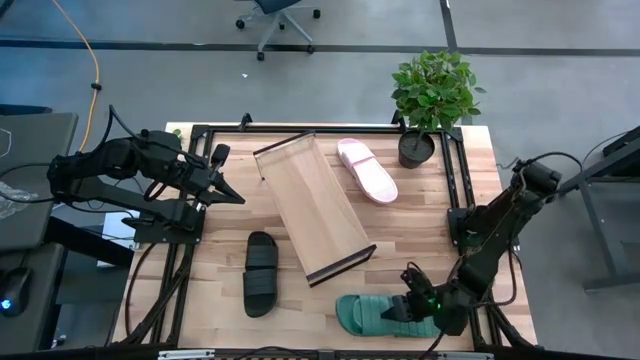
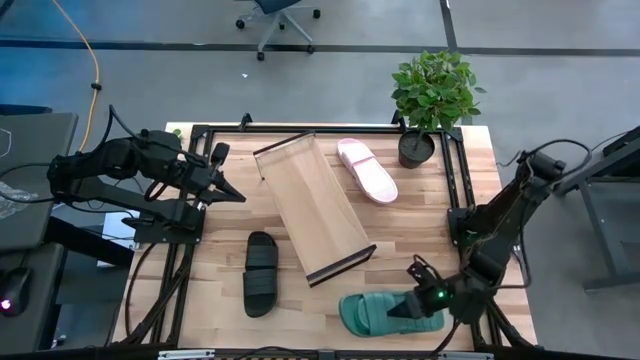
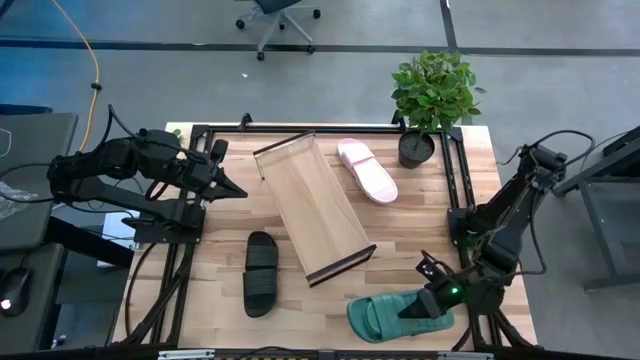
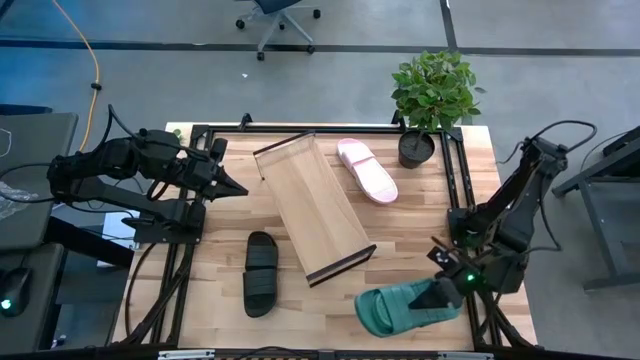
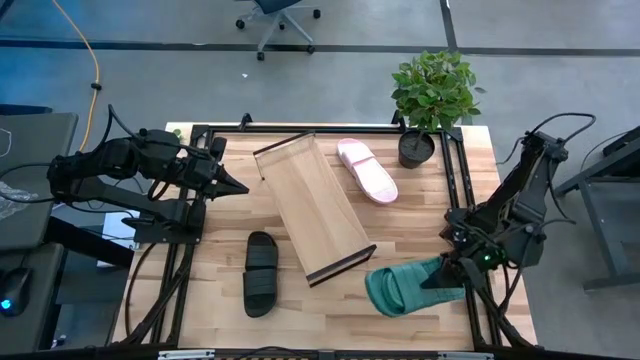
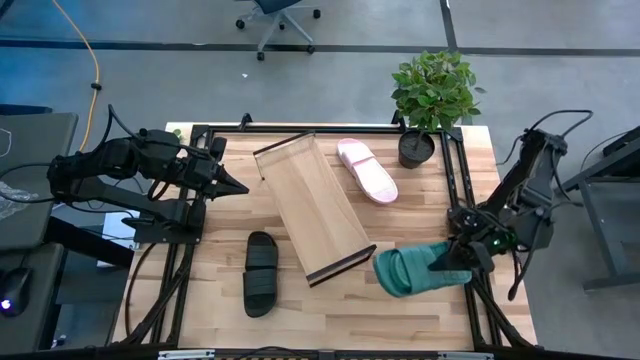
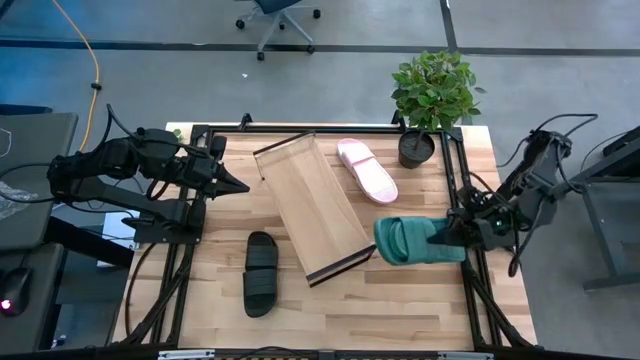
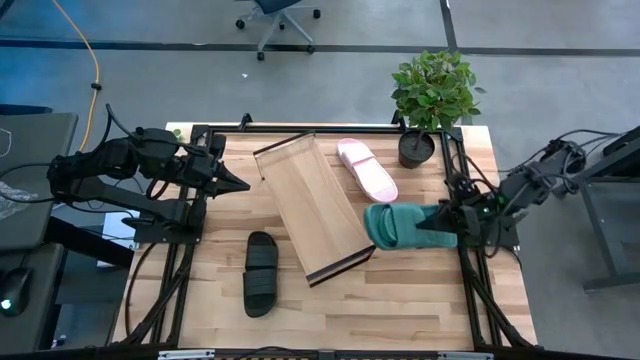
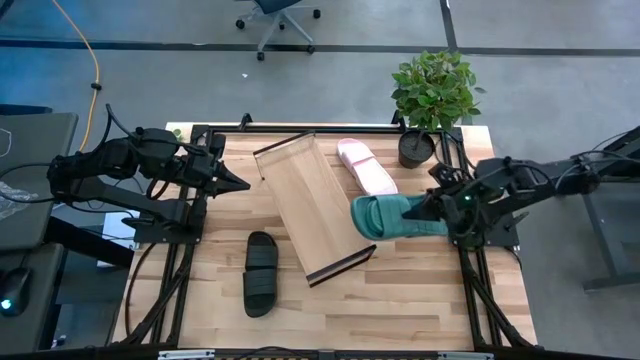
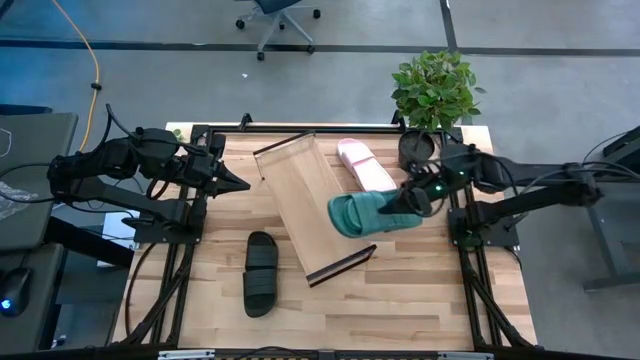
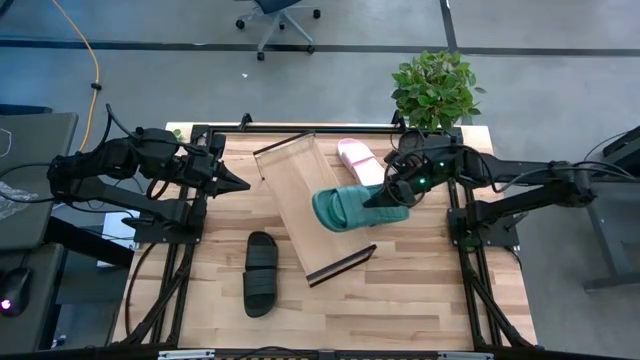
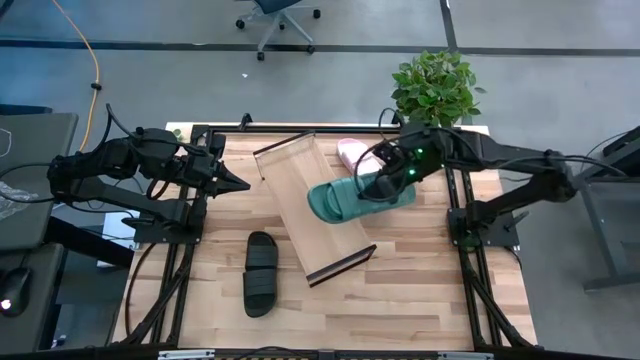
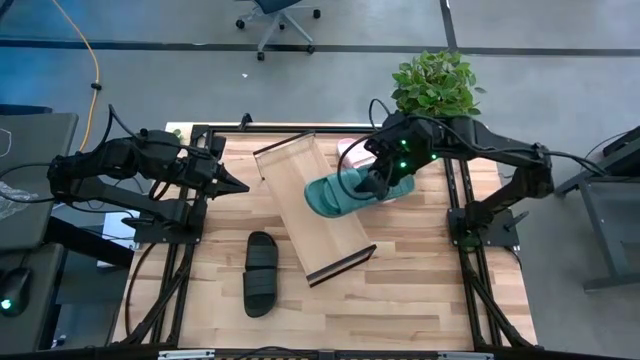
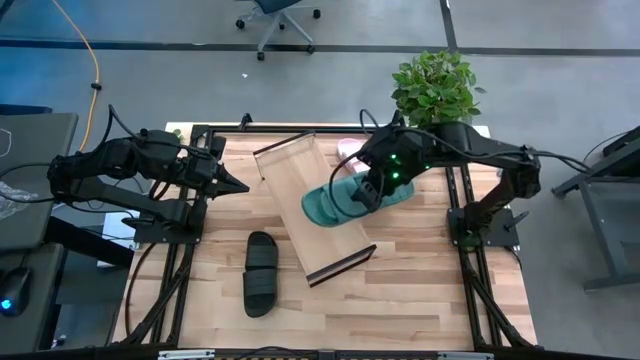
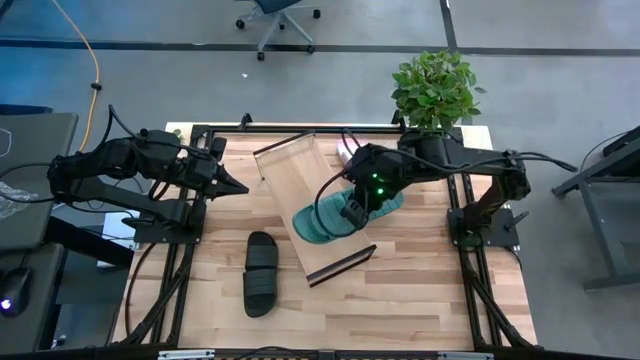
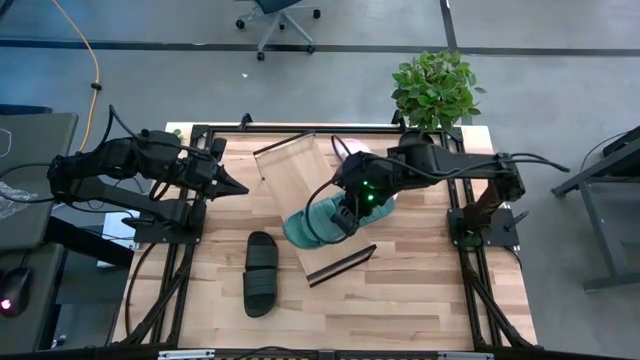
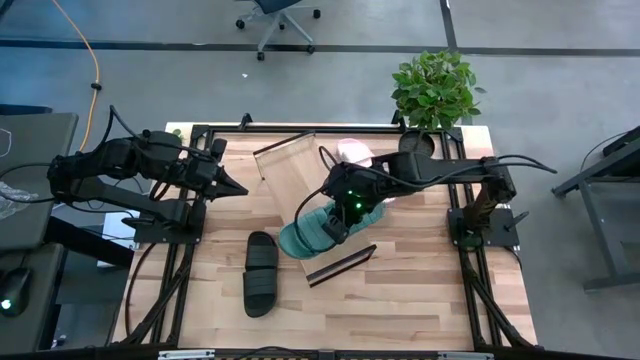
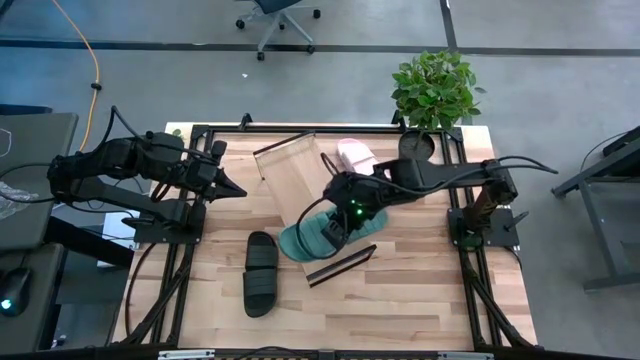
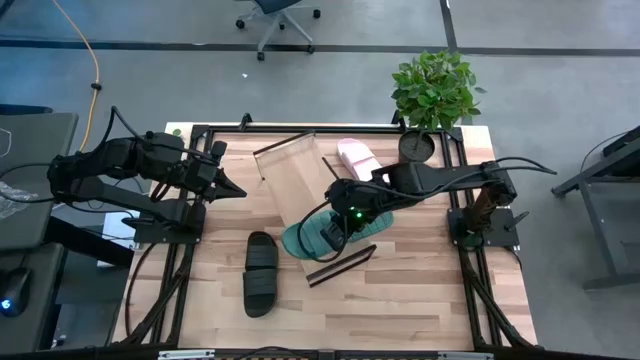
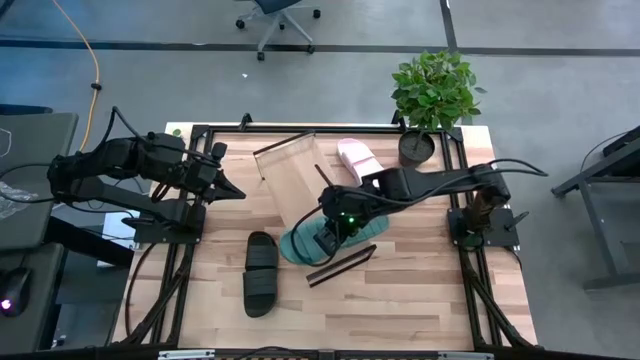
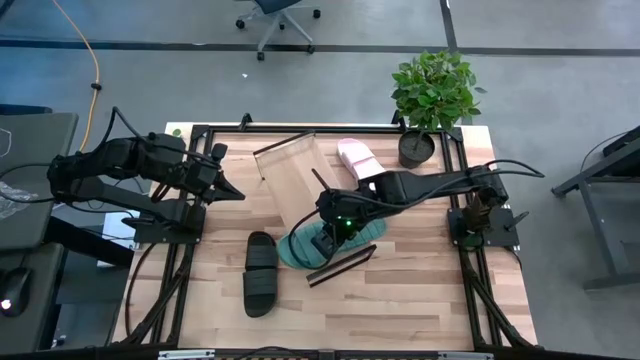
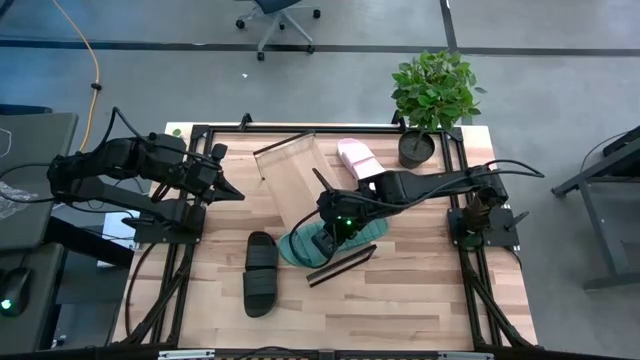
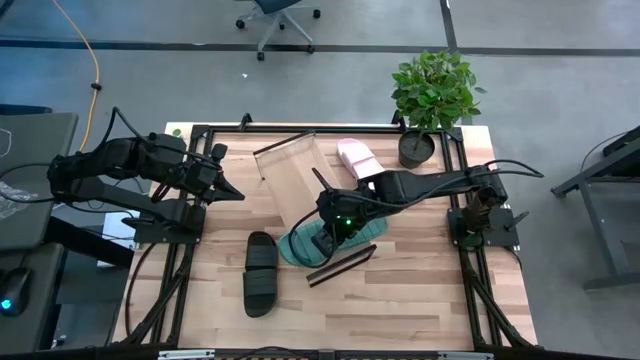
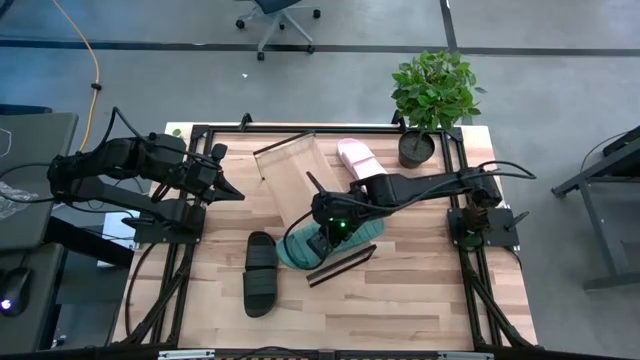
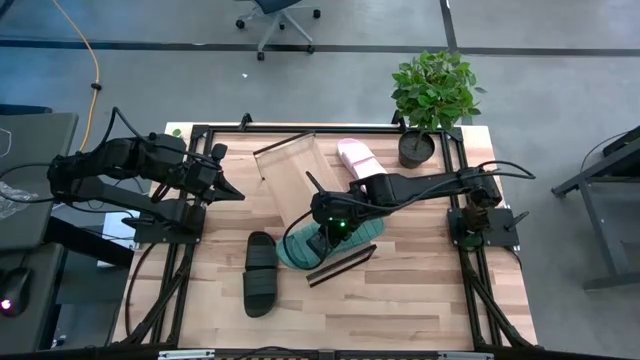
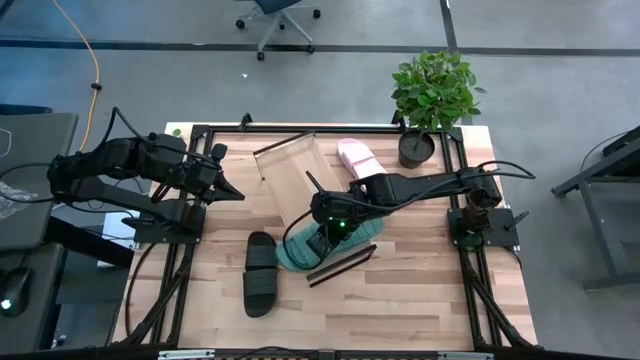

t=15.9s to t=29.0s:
Task: Pick and place slides into the shelf
Put the blue pair of slides on the shelf

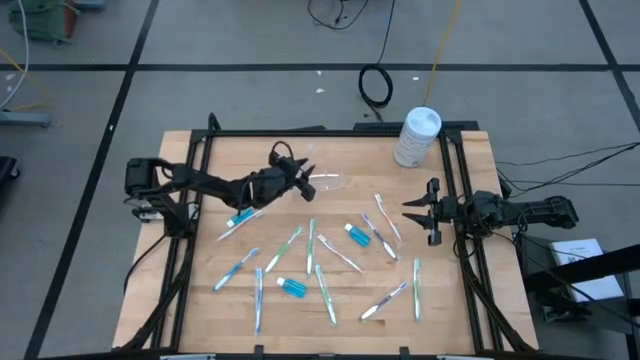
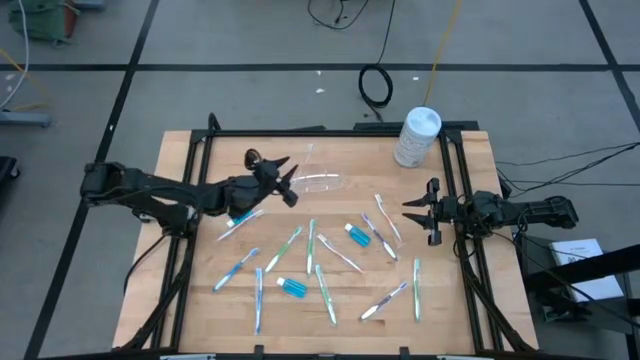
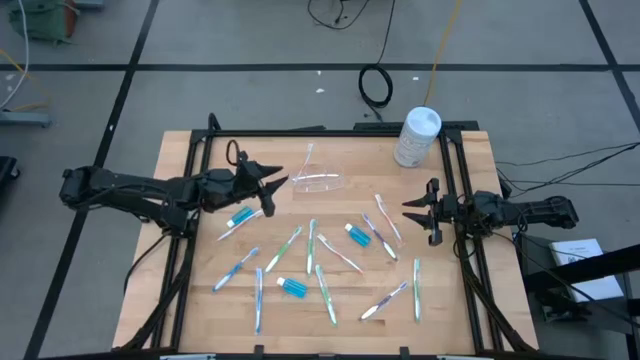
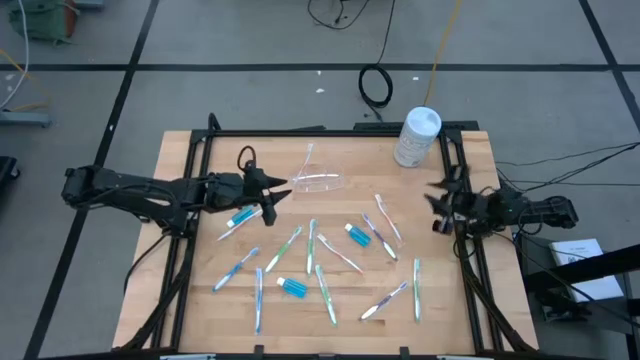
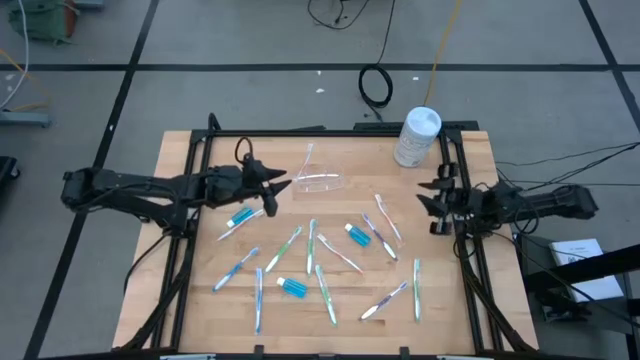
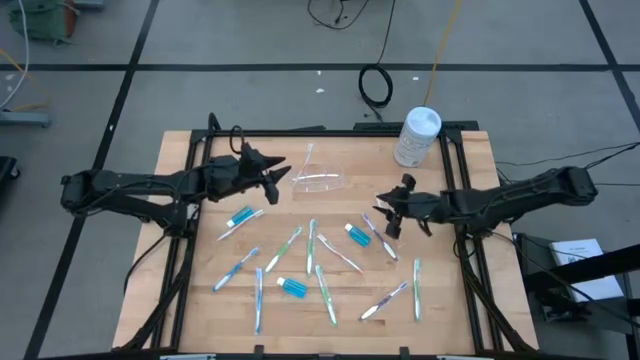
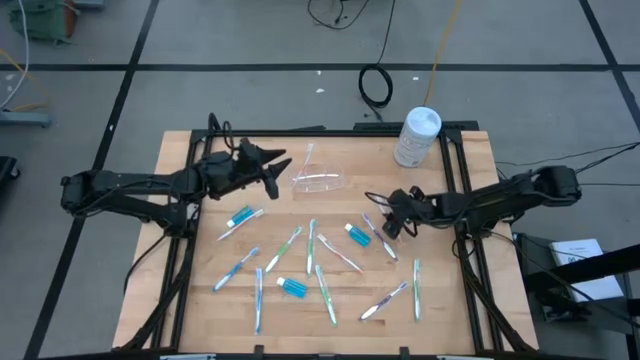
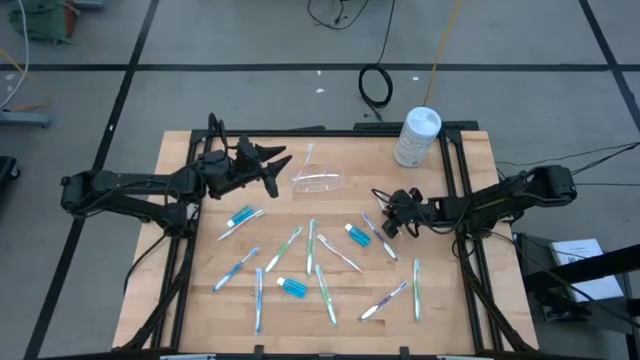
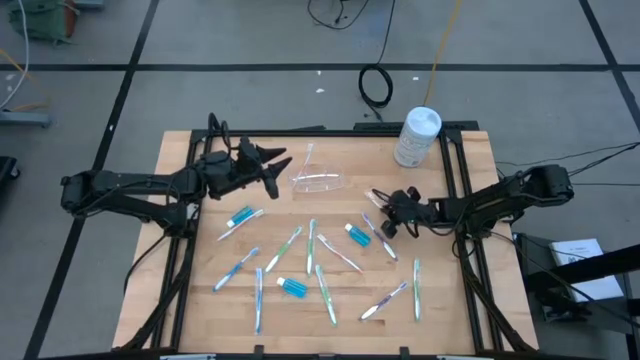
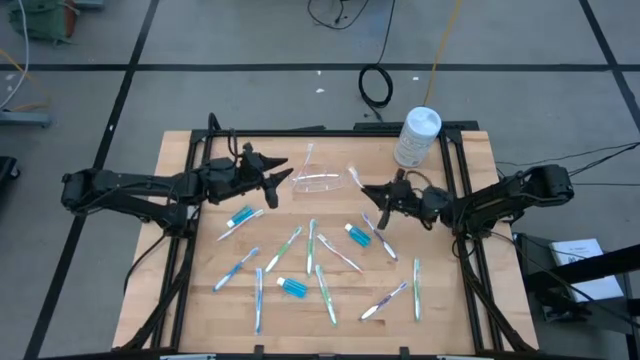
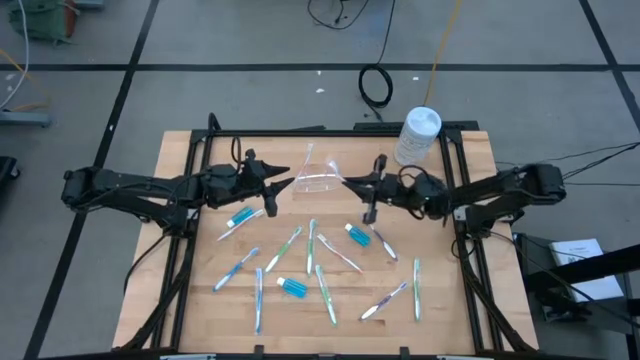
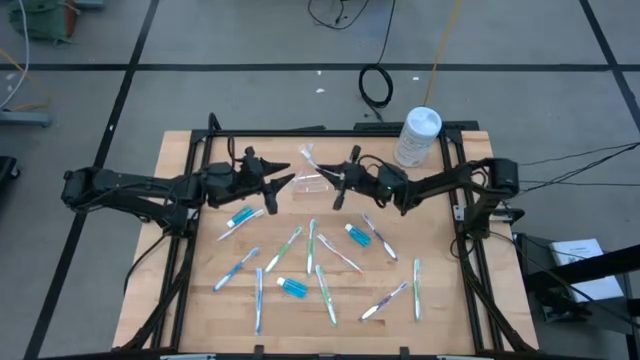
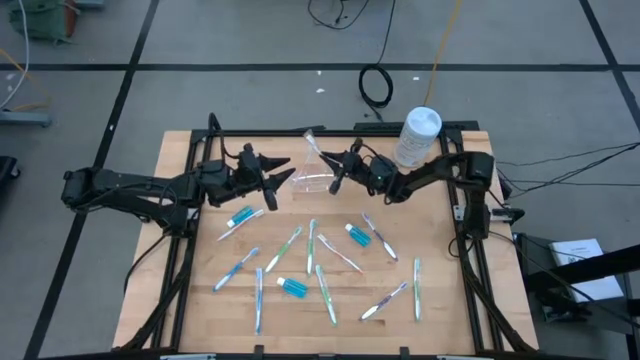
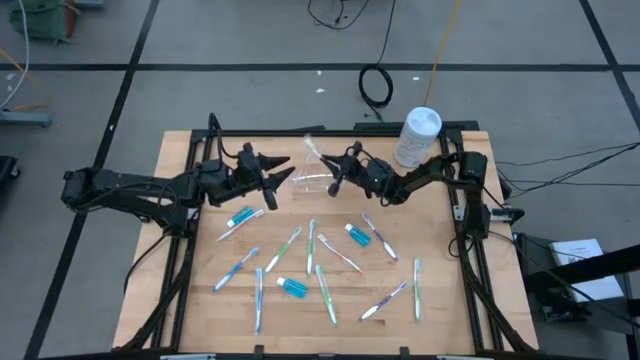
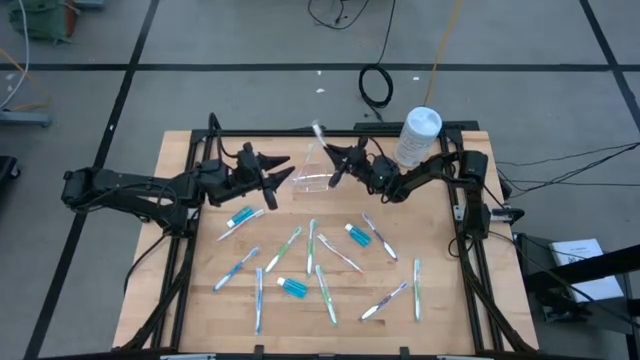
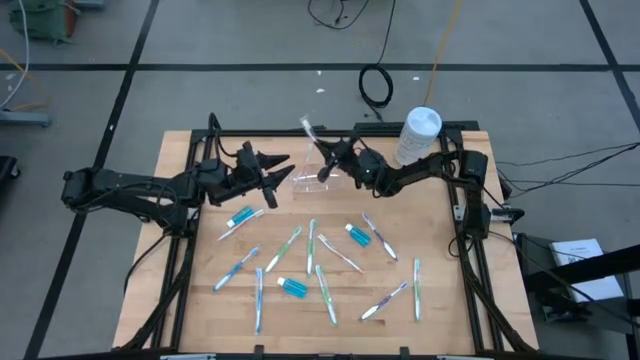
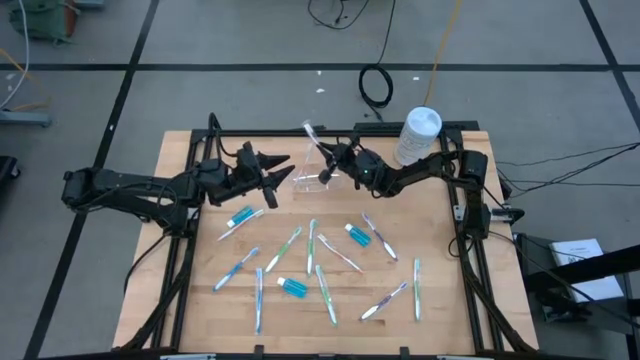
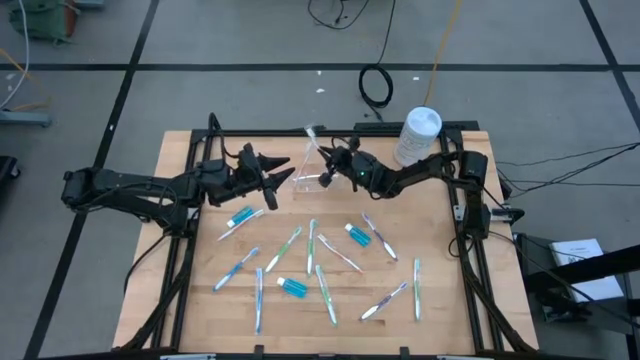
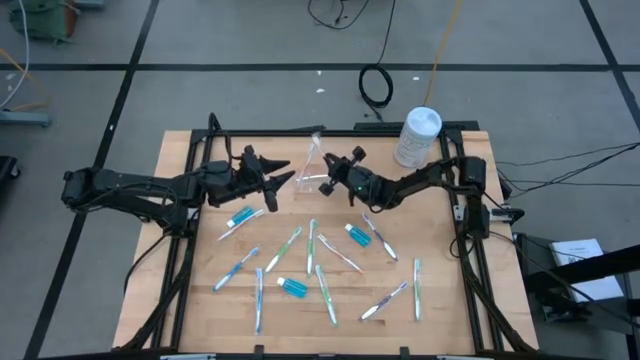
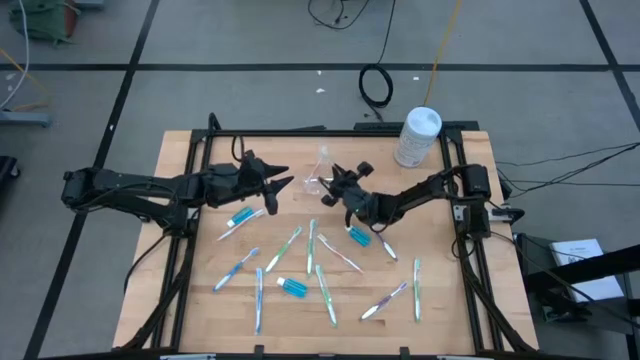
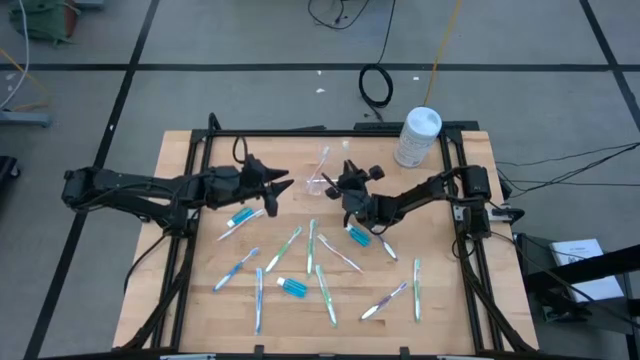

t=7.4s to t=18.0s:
Task: Pick & Place toothbrushing station
Put the orange toothbrush into the transparent organizer
